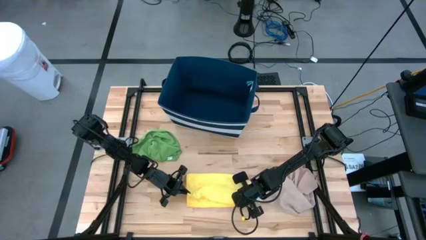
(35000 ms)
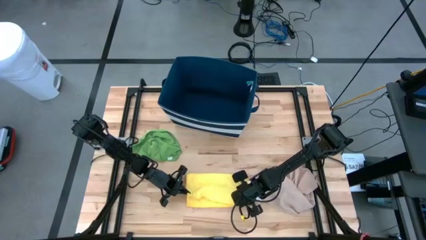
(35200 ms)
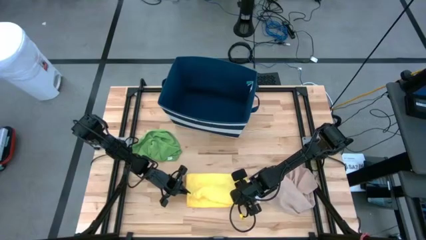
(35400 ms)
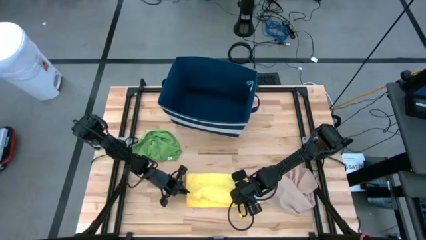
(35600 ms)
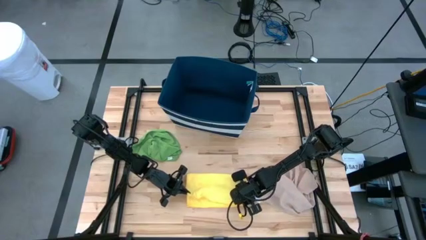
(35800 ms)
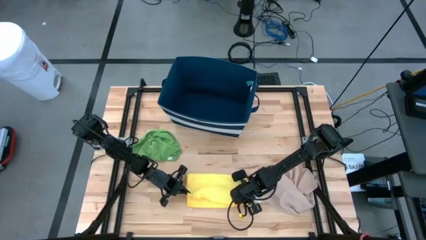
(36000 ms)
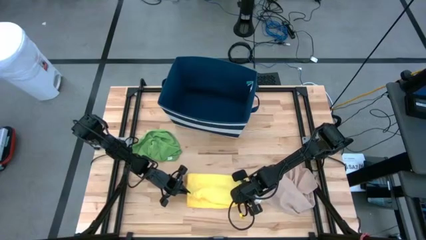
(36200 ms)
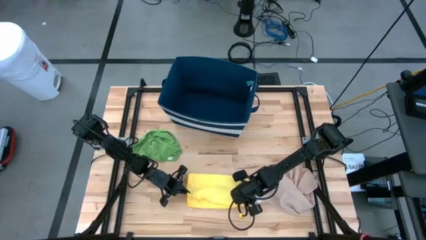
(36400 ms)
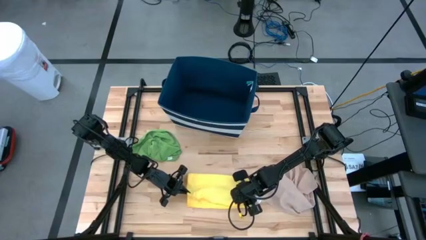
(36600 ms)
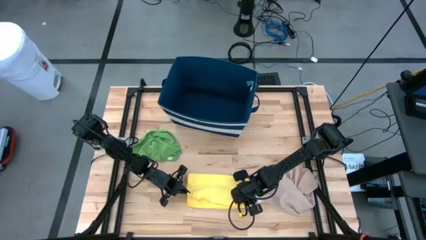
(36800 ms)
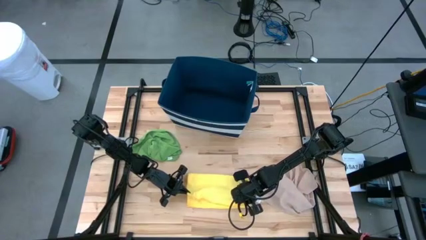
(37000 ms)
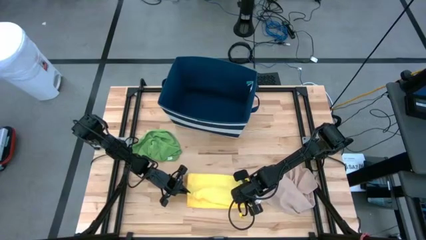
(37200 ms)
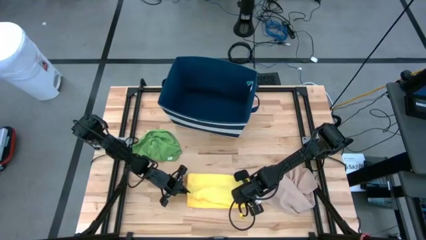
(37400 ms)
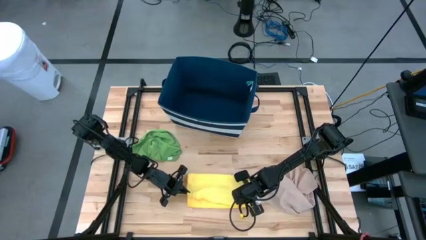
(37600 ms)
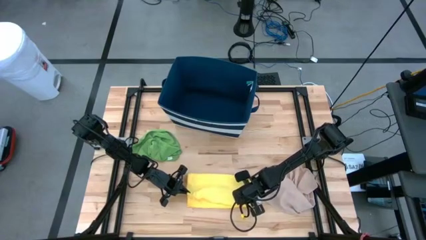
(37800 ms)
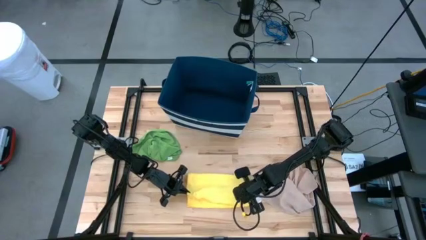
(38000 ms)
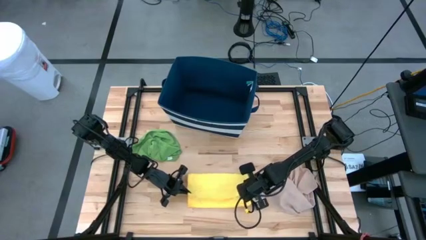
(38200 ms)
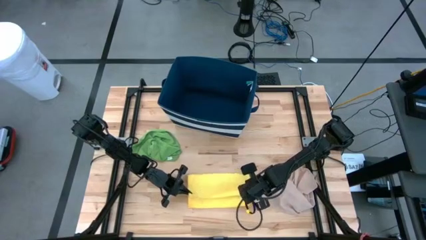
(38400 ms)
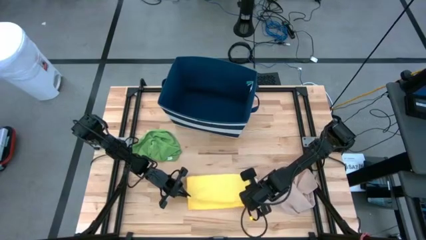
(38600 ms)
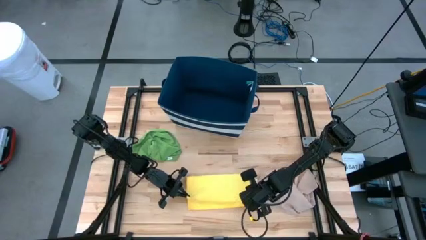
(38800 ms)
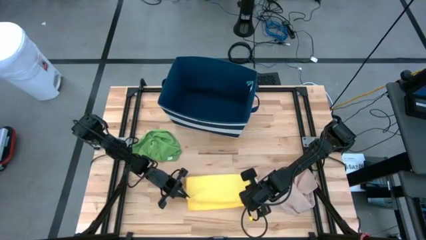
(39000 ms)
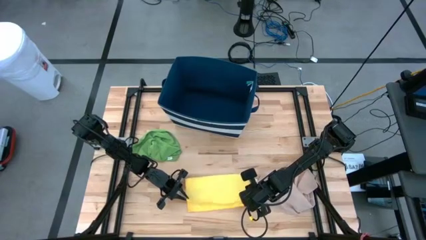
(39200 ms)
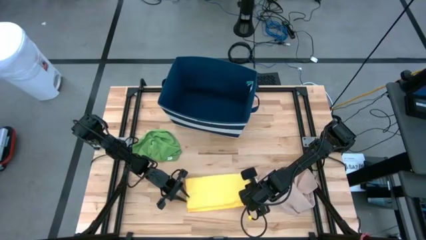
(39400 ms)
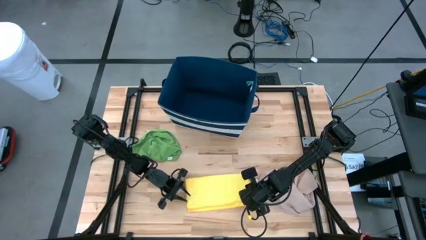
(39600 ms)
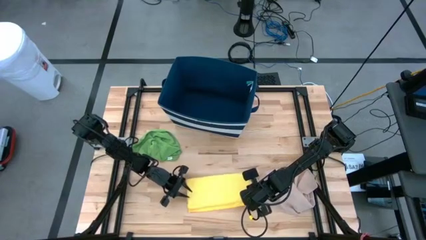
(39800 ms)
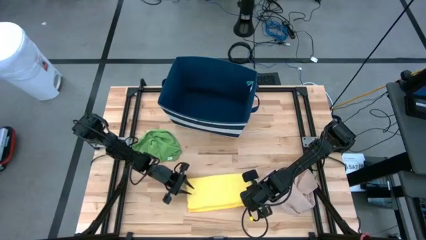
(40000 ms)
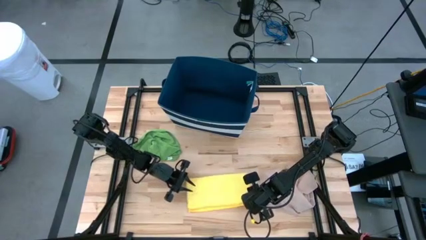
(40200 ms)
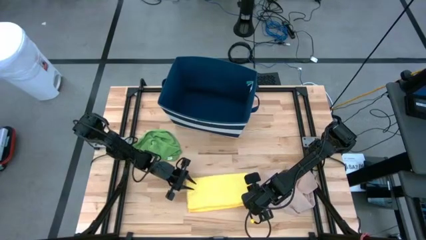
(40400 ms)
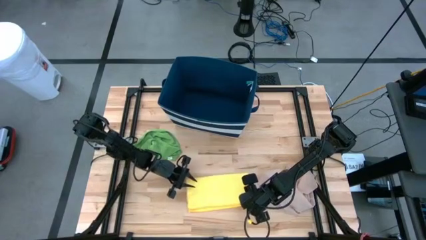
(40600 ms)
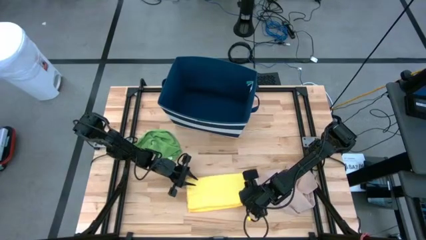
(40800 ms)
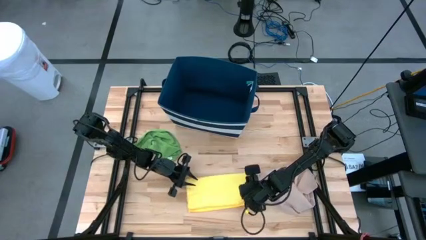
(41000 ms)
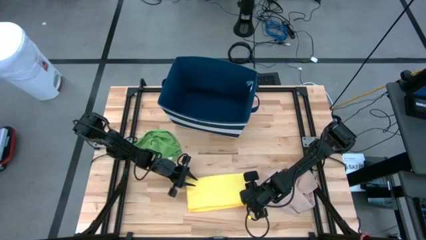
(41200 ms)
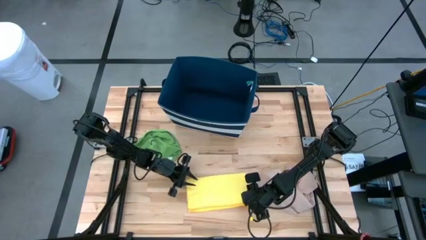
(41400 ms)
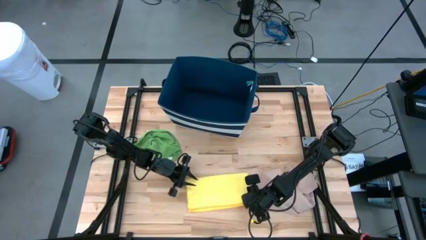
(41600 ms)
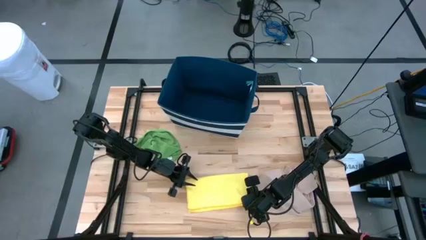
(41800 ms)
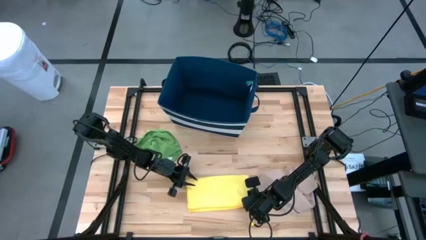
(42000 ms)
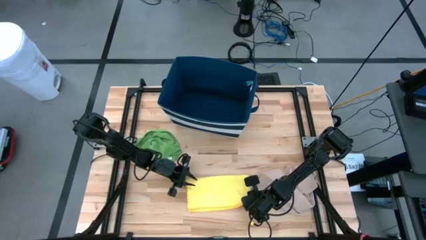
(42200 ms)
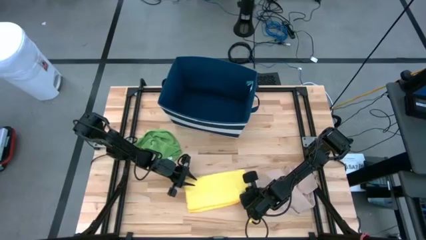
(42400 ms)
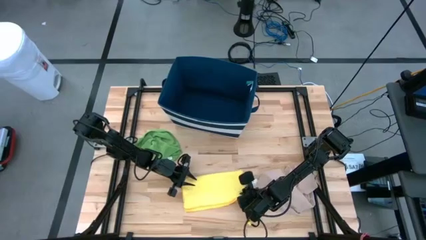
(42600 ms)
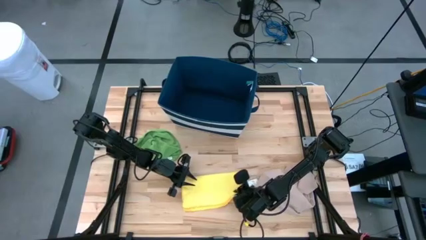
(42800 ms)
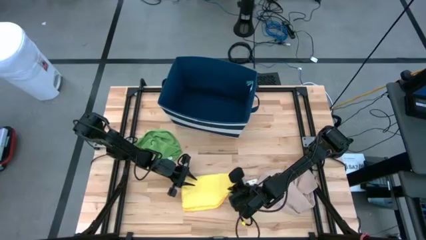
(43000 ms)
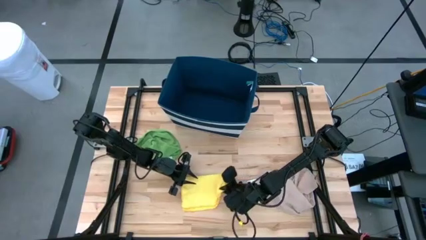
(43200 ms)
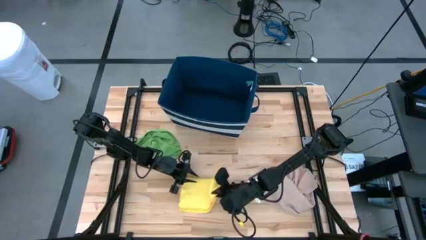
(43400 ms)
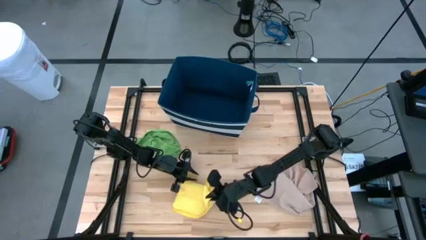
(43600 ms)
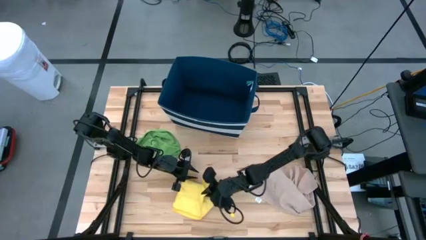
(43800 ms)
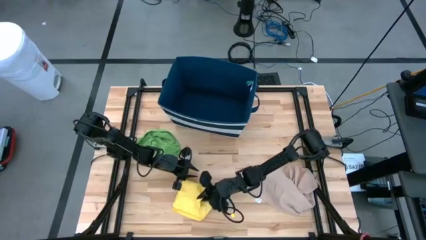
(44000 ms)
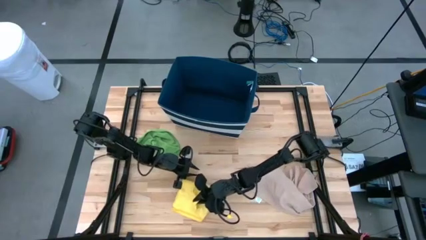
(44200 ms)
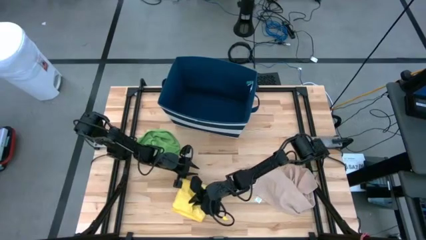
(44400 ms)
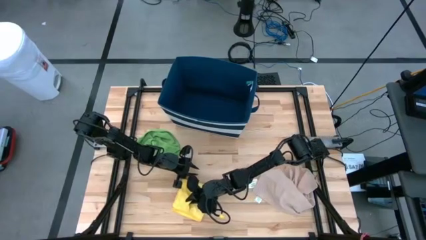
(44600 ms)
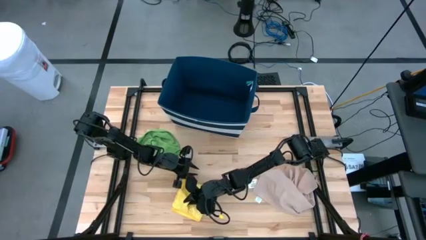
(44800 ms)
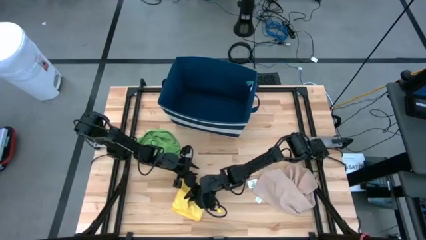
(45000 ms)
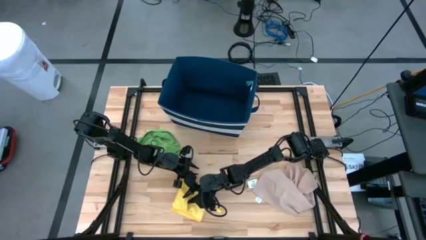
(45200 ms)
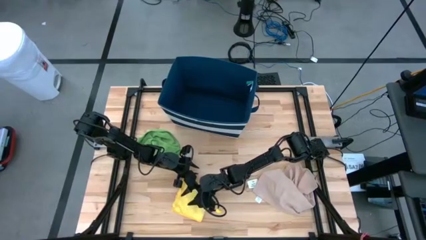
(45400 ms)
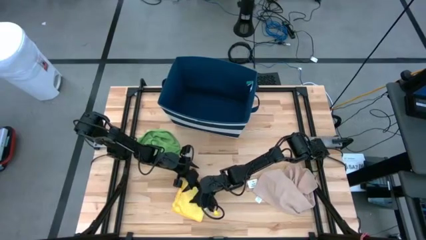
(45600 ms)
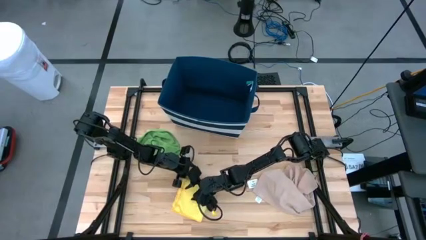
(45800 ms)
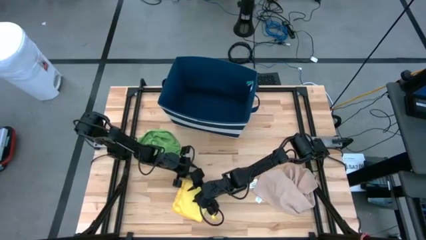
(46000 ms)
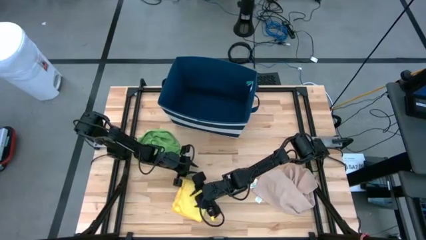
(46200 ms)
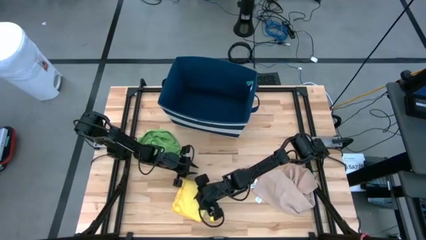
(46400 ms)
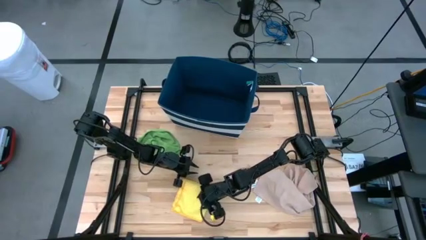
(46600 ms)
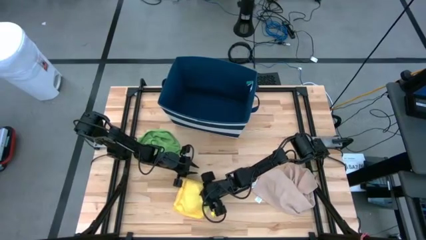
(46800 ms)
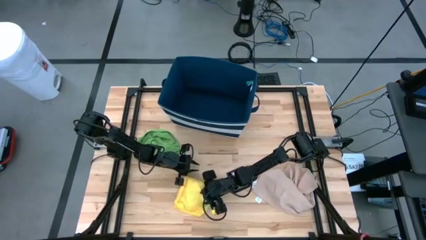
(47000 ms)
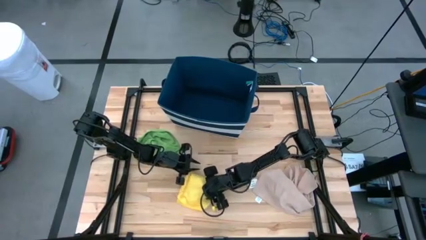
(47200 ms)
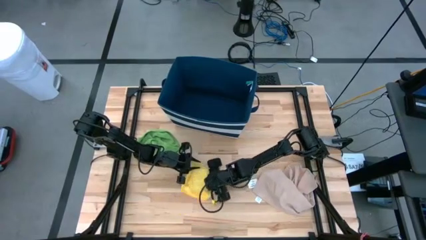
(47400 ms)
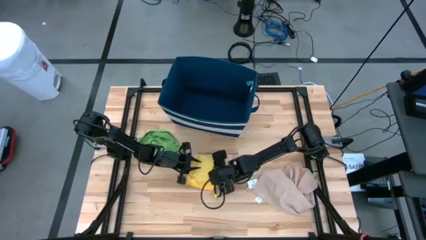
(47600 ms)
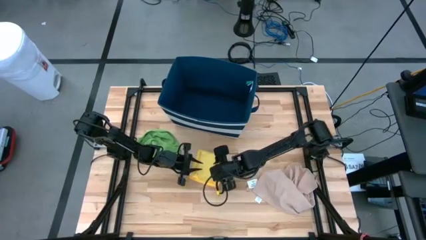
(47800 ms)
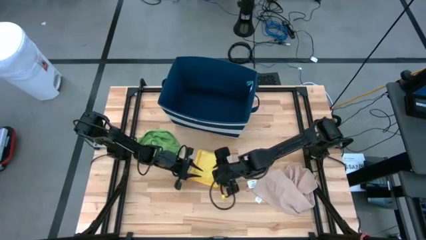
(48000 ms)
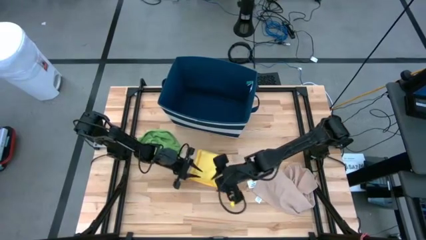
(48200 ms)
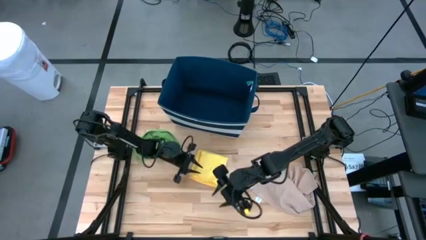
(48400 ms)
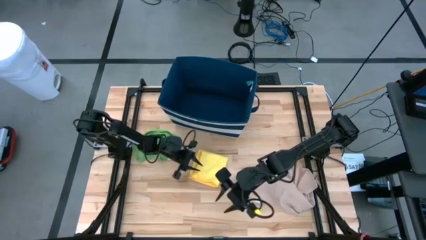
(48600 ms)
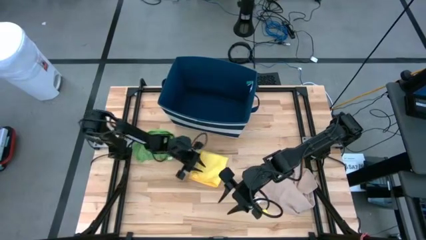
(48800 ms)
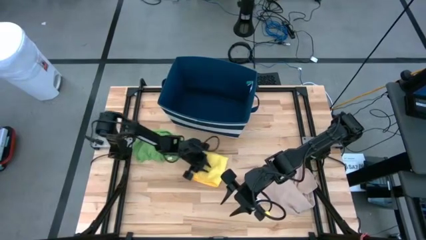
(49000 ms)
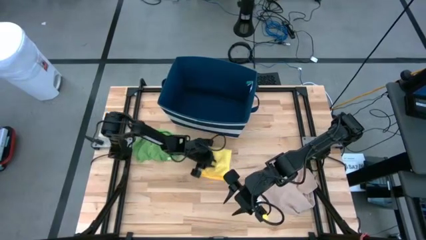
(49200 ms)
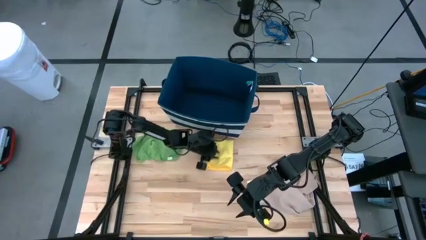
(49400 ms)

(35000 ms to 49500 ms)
Task: Fold towel
Fold the yellow towel
